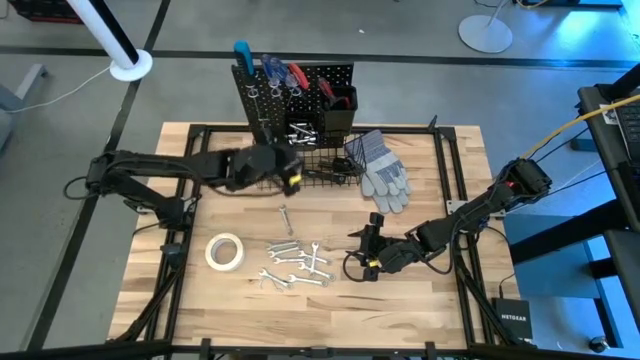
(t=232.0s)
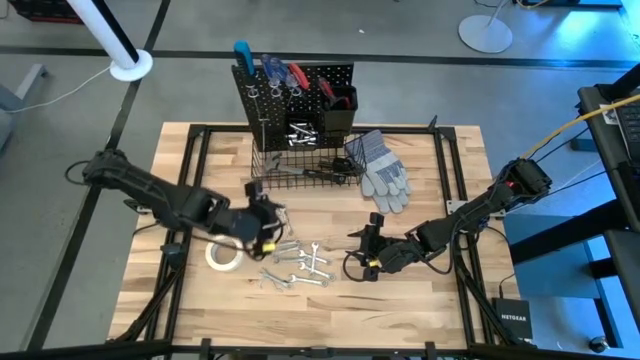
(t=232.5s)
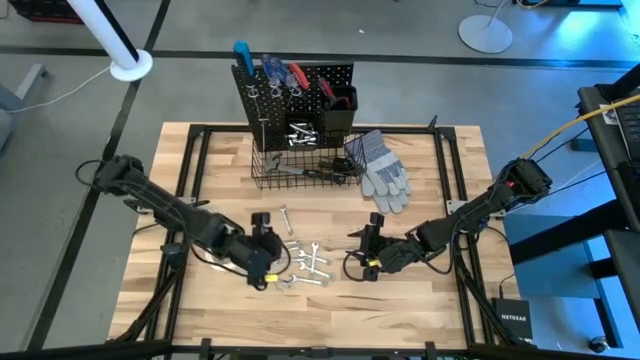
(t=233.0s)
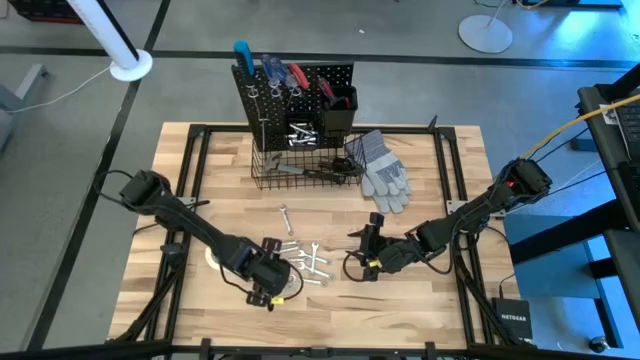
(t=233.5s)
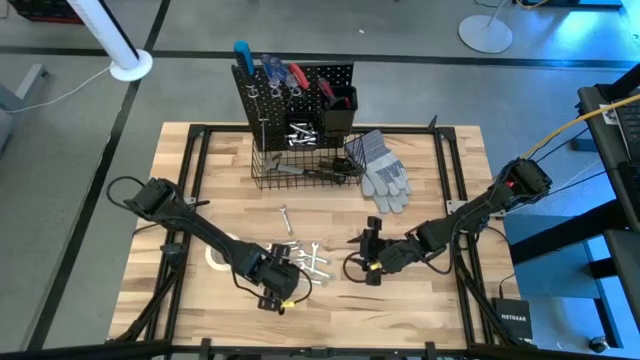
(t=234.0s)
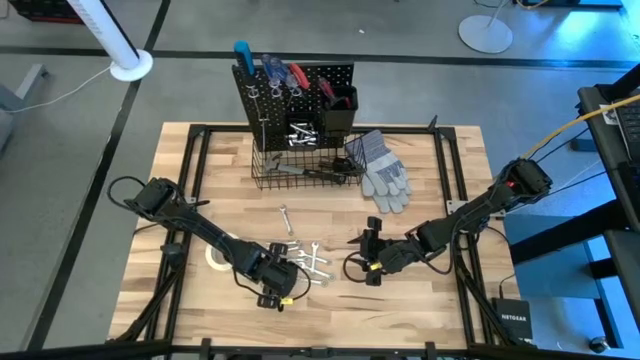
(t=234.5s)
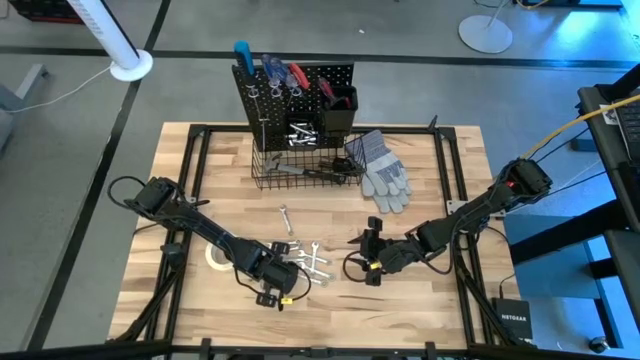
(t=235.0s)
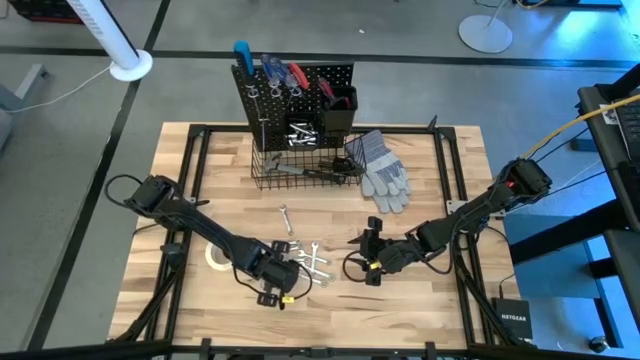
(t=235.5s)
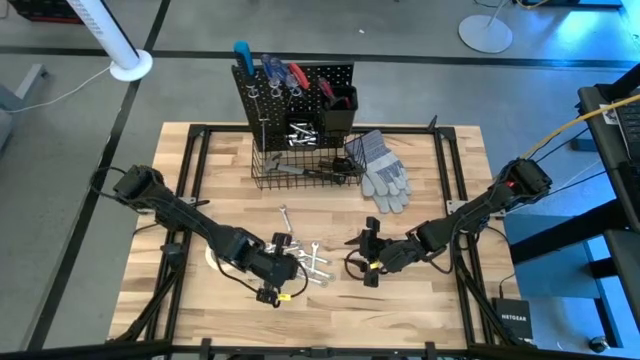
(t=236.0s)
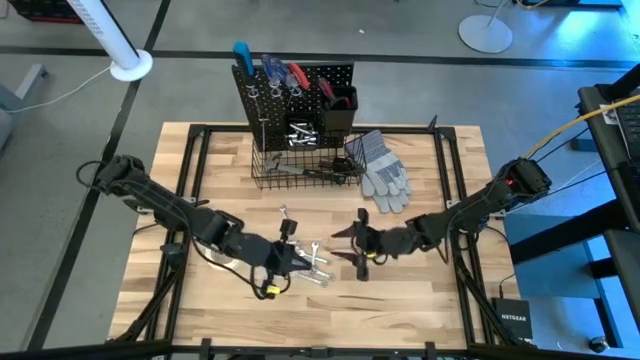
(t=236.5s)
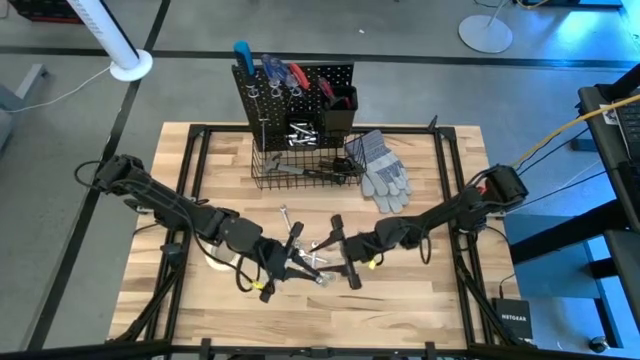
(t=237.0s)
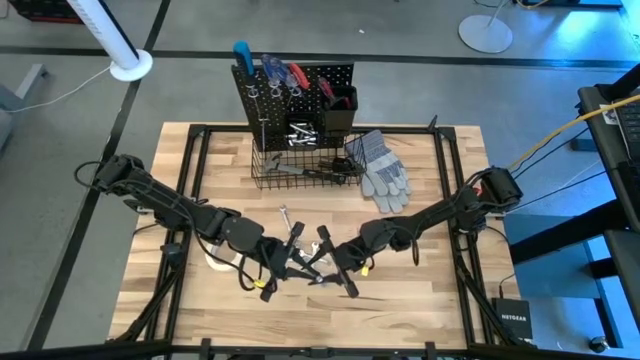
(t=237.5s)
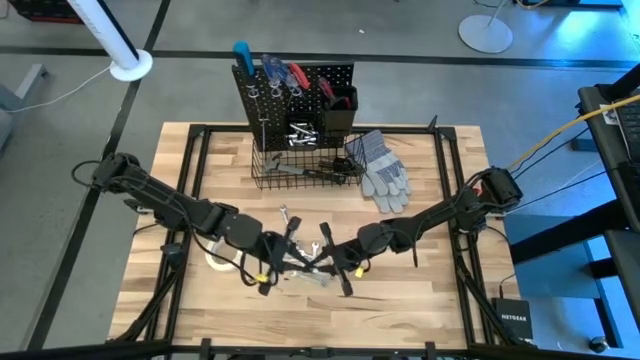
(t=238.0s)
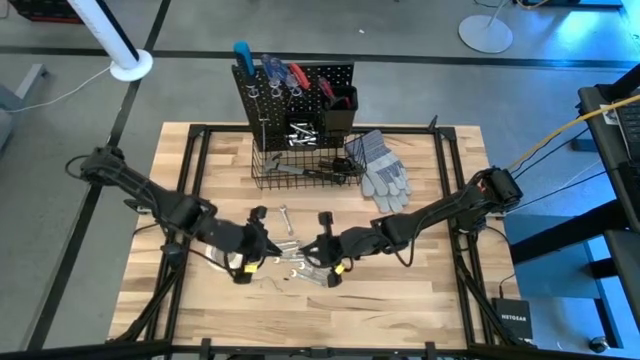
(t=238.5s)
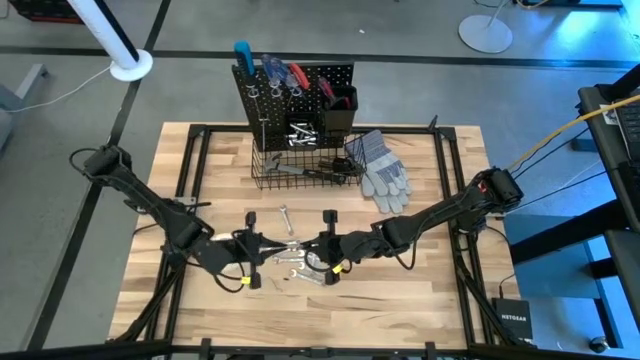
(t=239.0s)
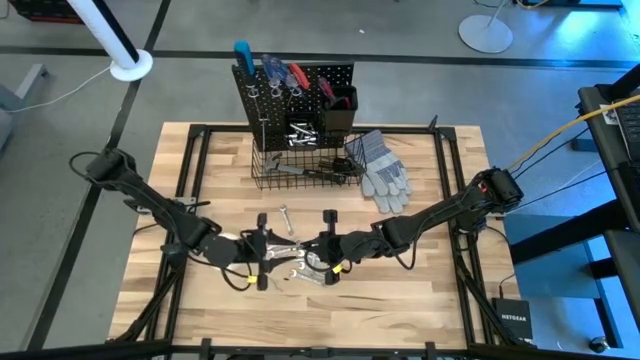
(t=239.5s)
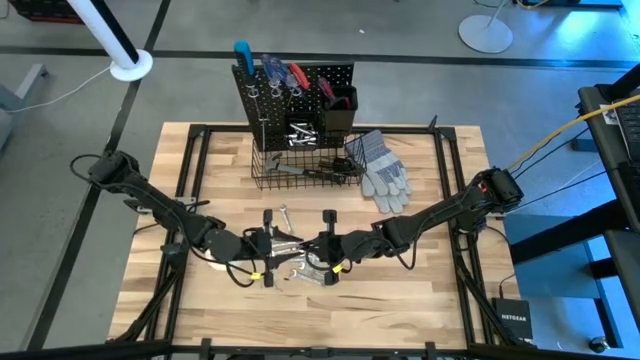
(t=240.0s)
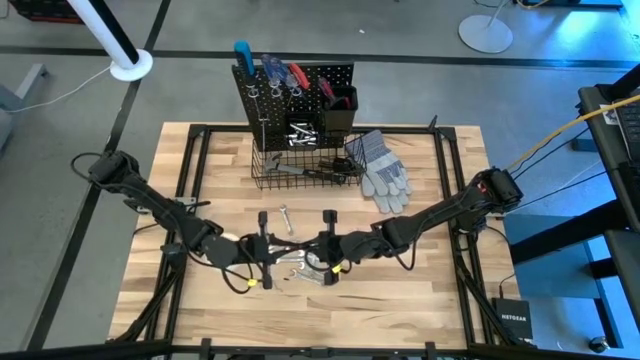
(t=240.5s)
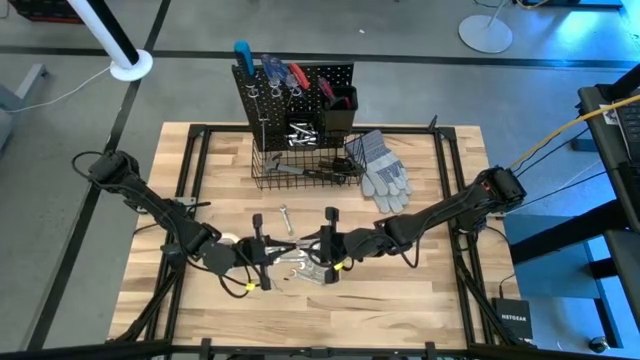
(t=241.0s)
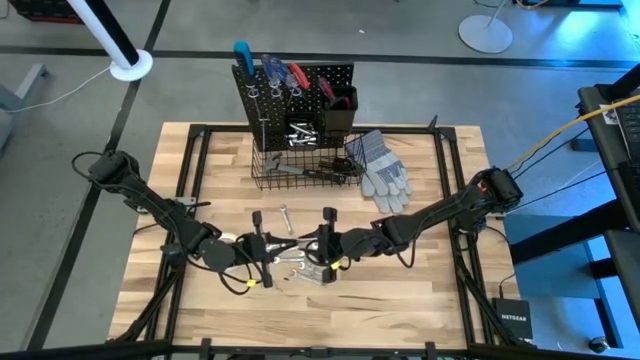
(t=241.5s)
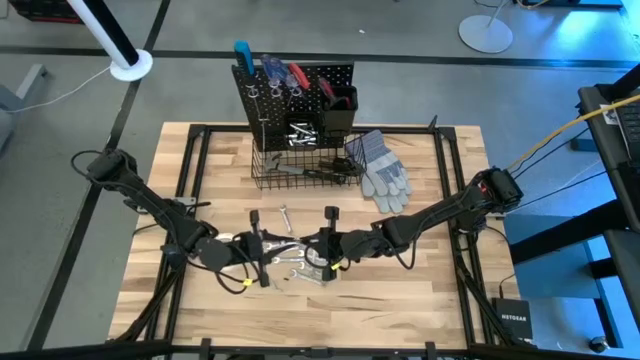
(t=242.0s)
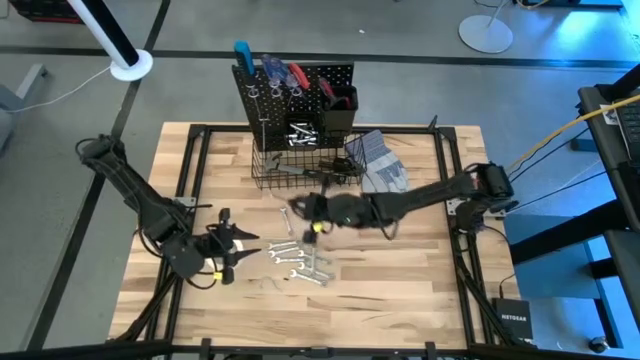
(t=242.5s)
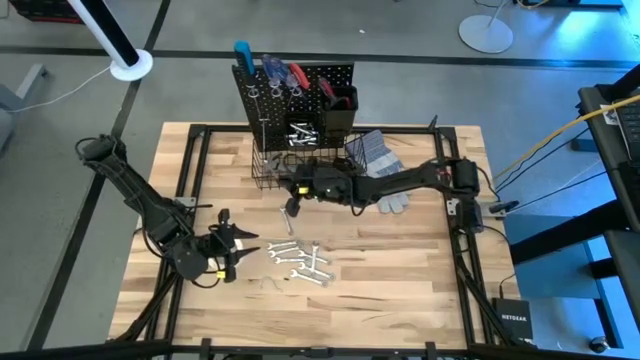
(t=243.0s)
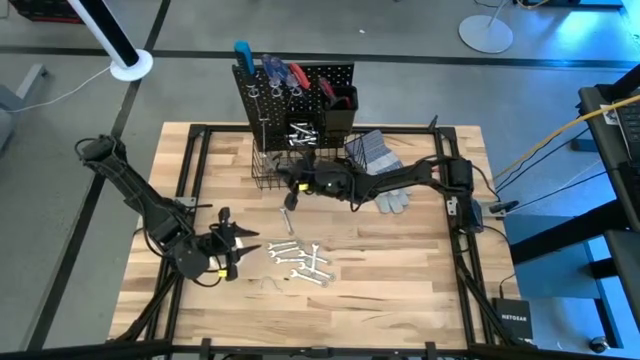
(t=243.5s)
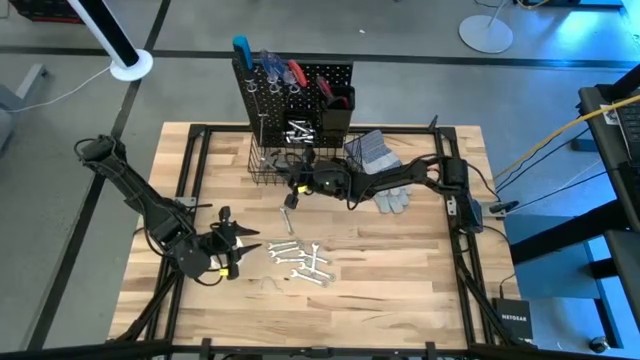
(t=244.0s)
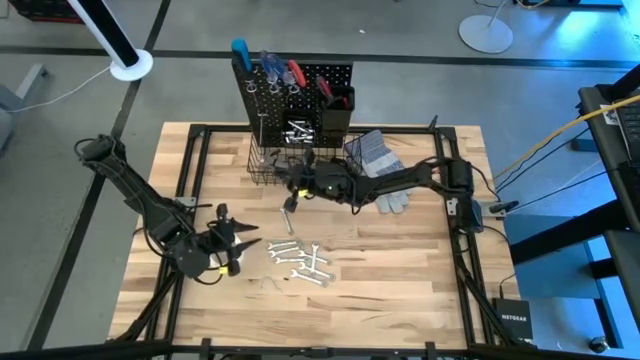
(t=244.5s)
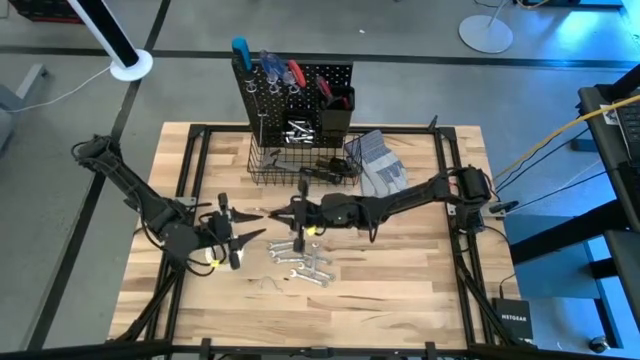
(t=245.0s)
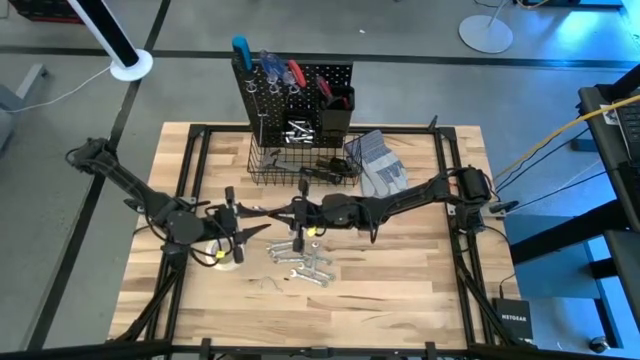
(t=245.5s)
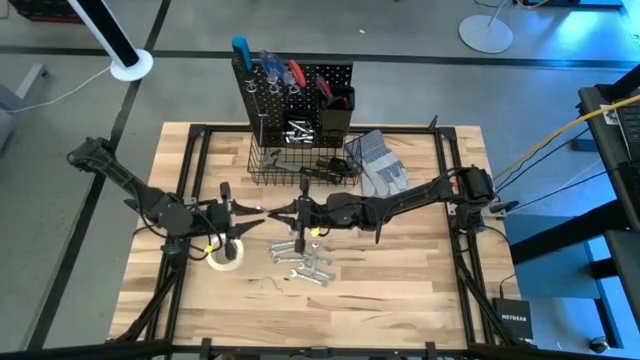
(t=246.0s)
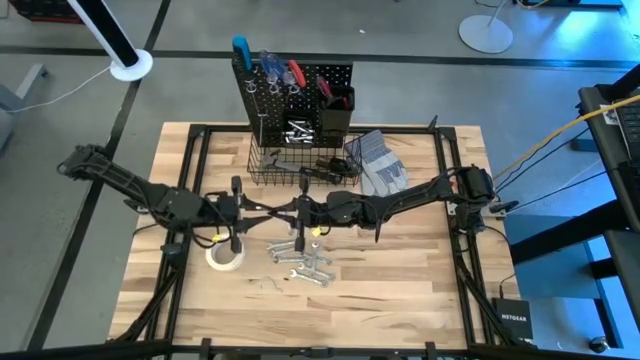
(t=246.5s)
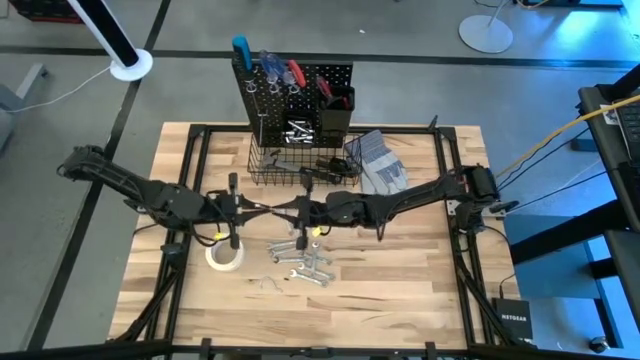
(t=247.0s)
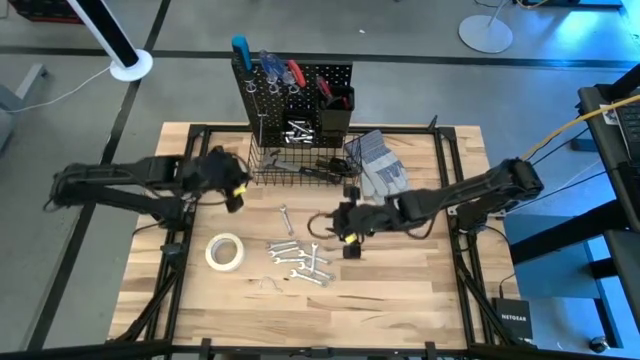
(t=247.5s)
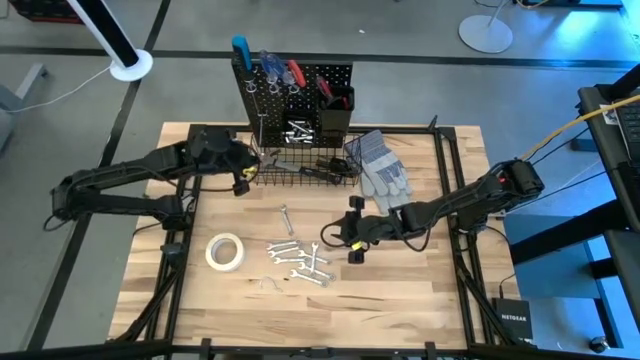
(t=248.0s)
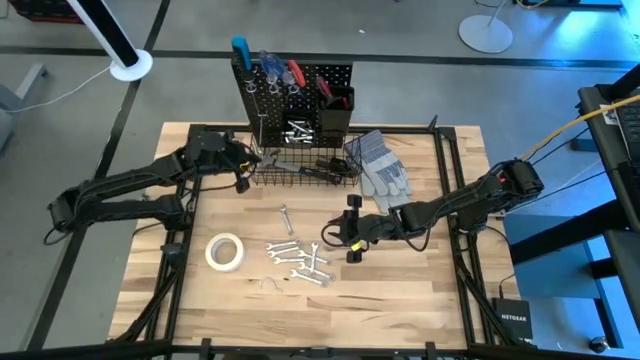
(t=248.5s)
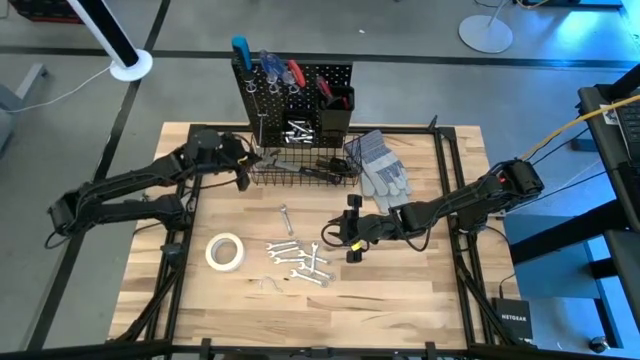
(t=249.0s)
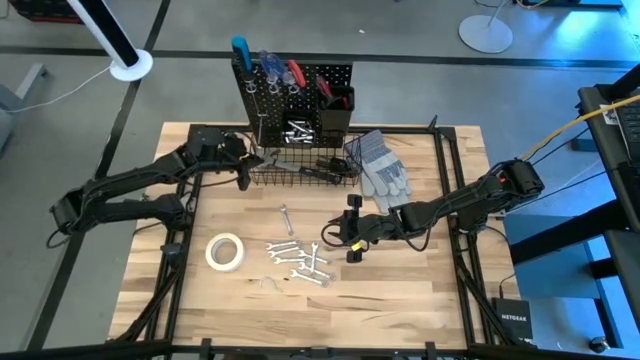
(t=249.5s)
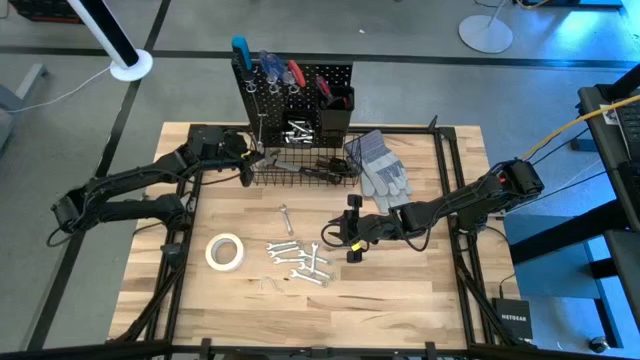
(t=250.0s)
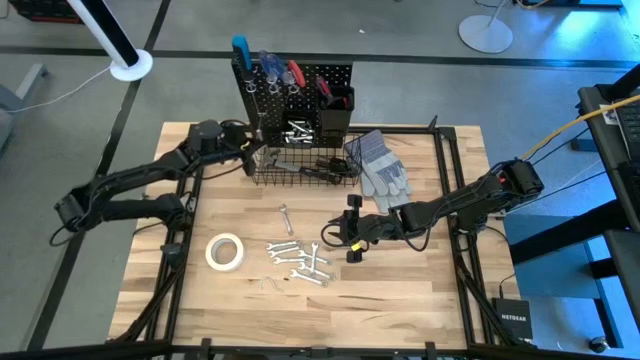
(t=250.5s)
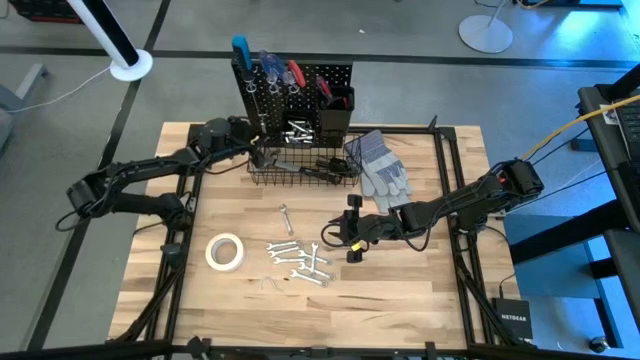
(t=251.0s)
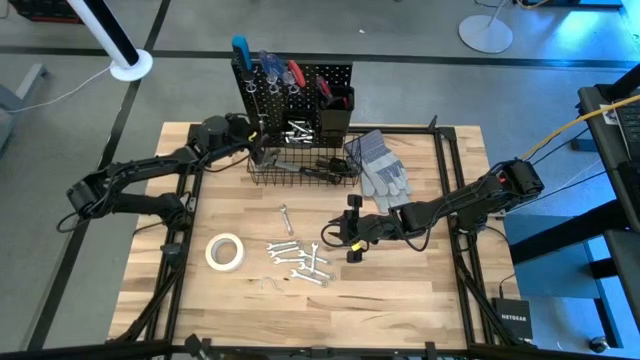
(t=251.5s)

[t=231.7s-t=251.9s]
Task: Hang tools onto peg board
Hang the wrench on the peg board
